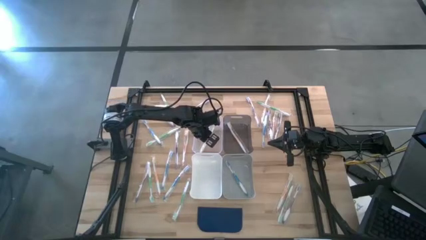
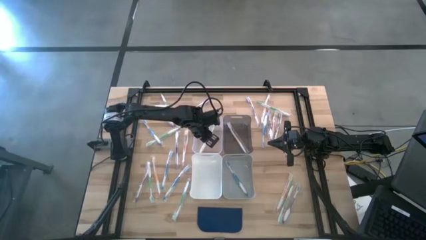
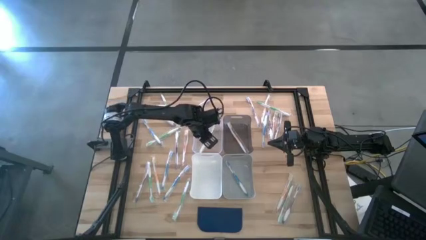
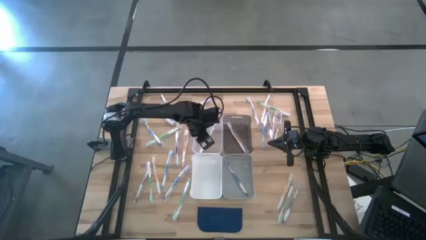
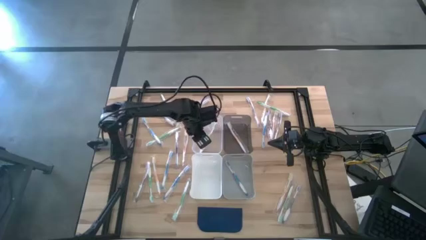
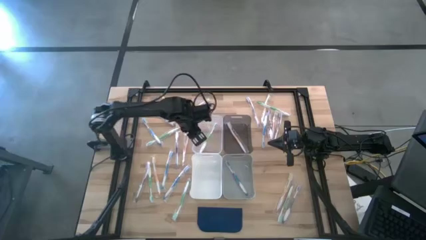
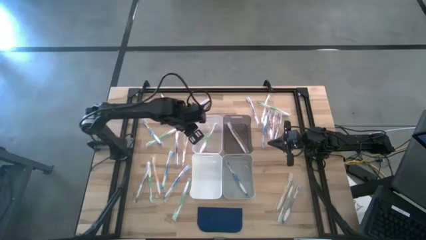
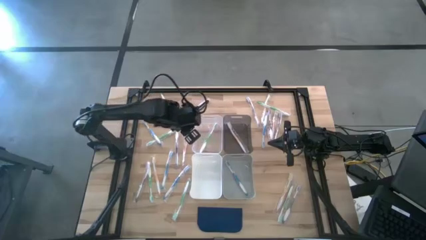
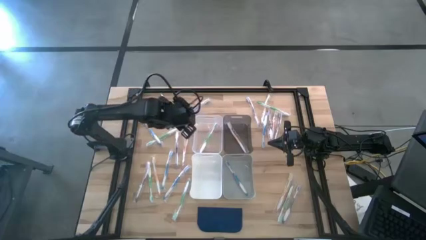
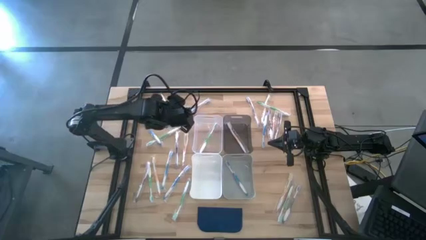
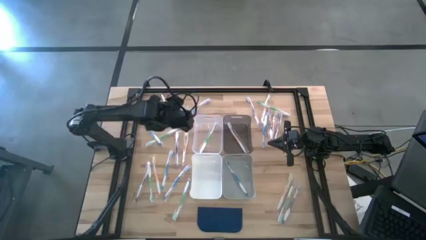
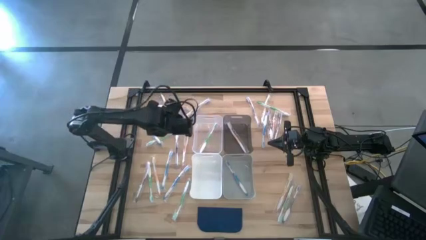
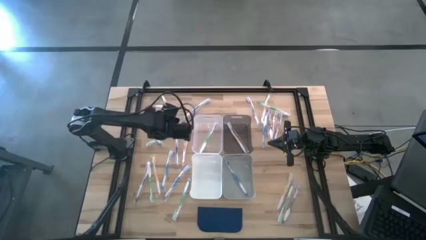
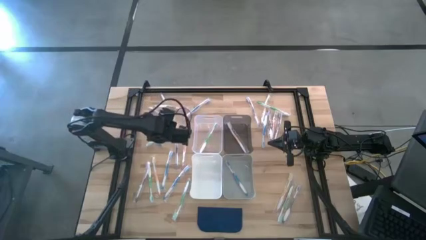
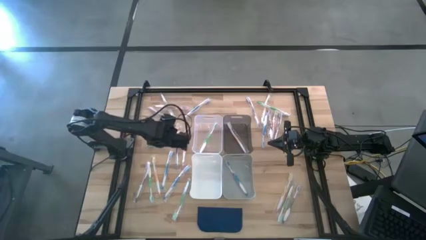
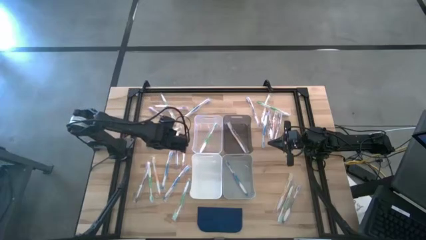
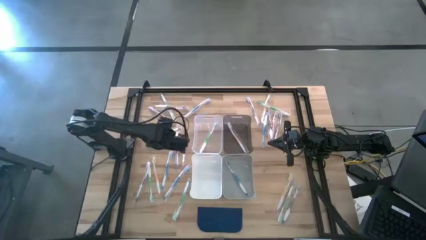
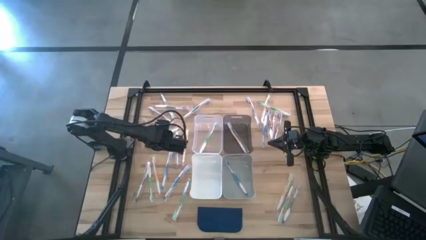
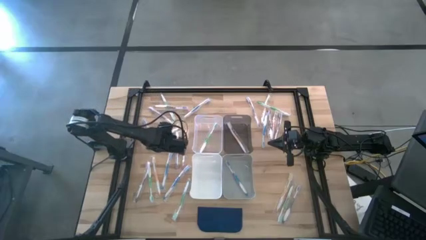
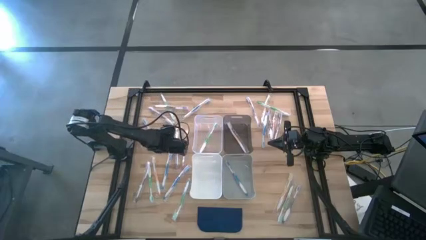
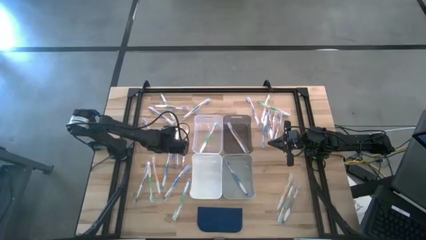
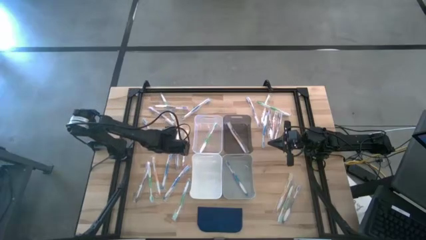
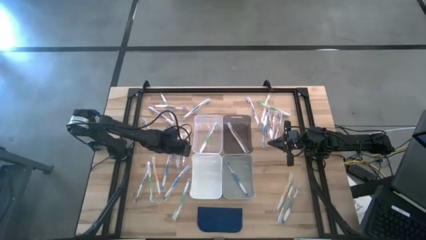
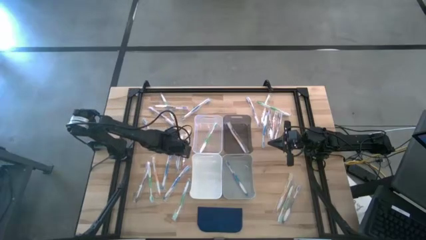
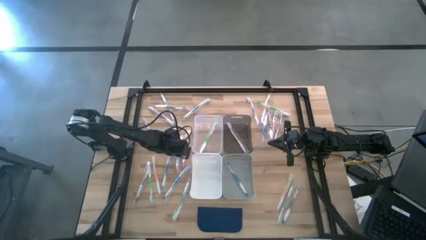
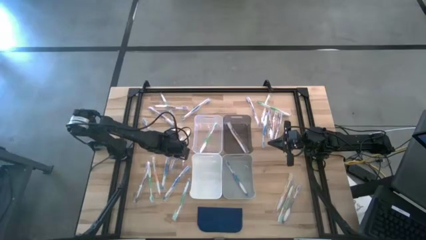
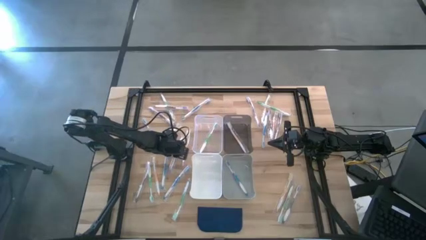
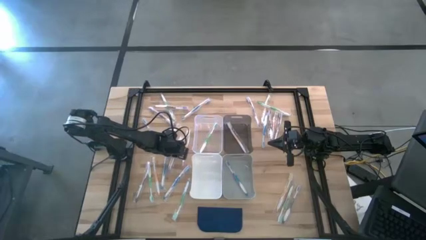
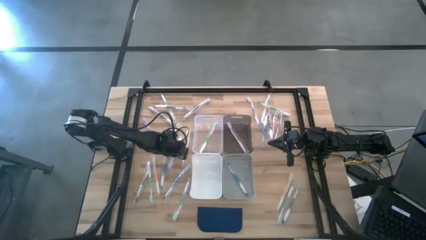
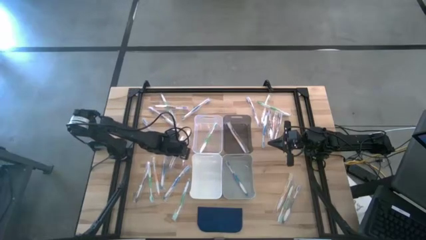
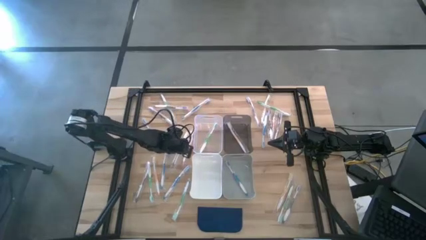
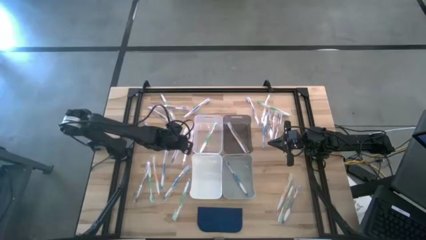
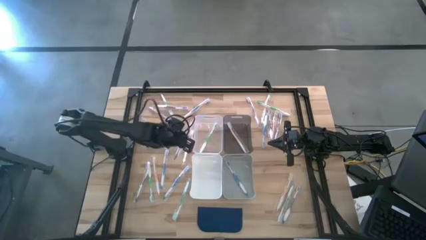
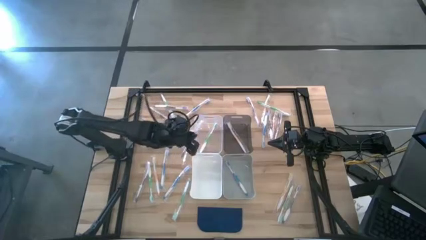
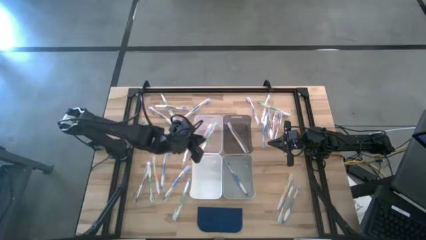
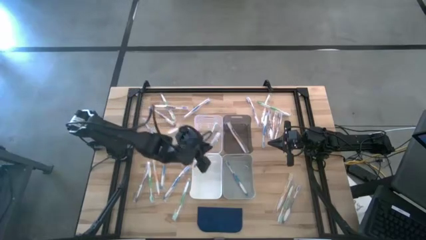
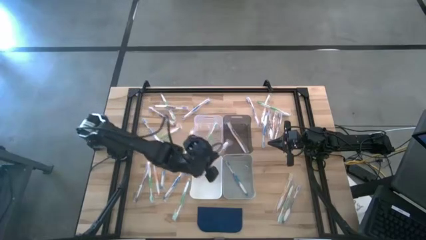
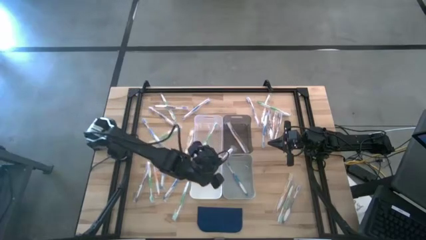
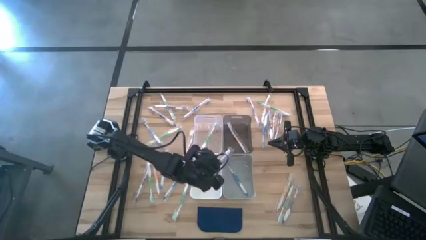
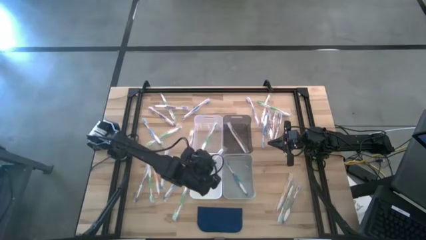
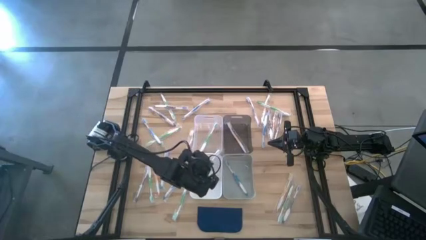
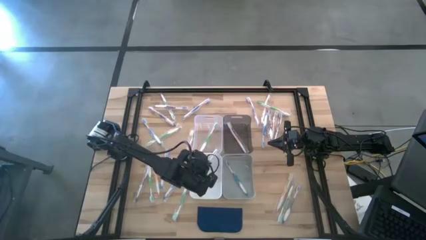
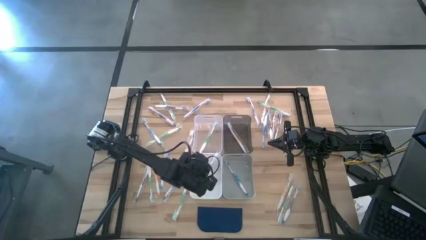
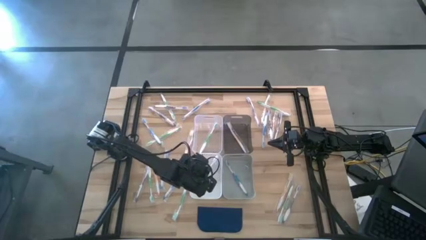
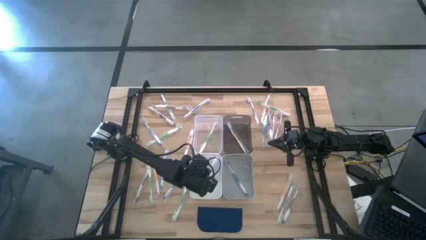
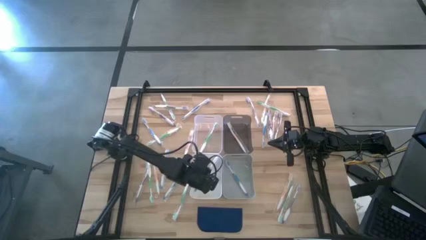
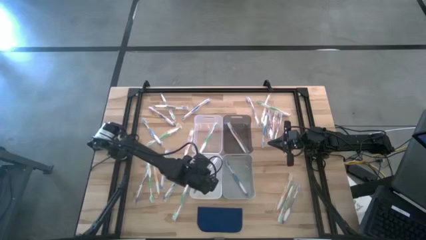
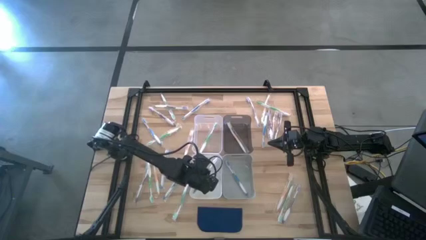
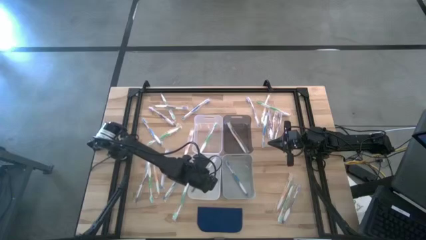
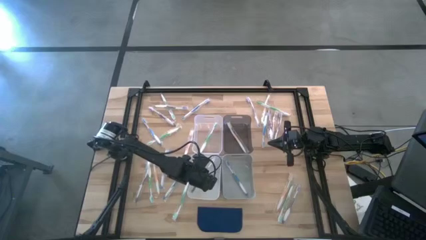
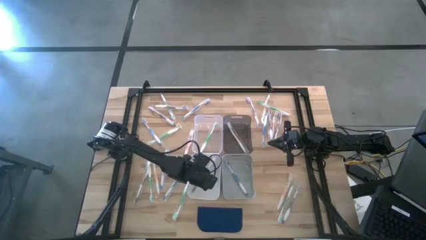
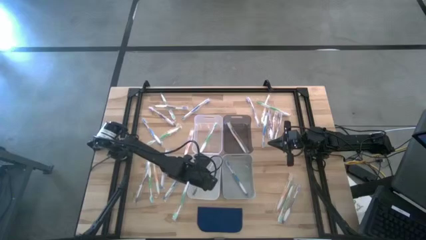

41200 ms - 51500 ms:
Task: Pick & Place Toothbrushes
Put the violet toothbrush into the white bin

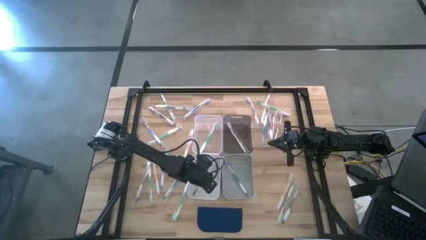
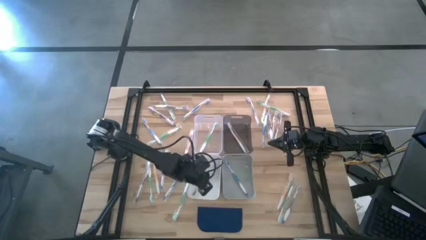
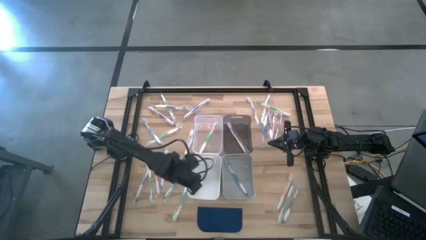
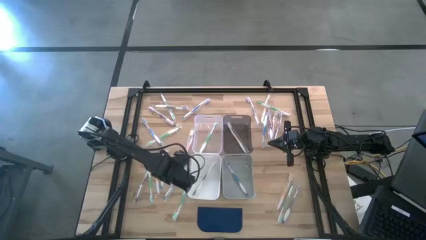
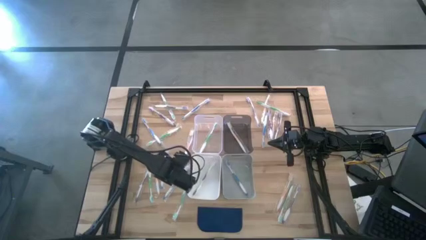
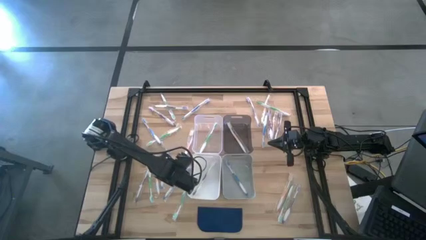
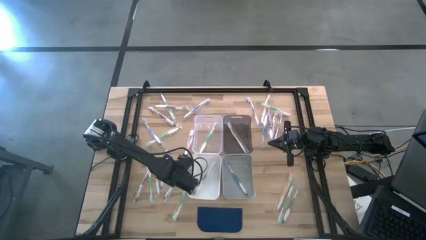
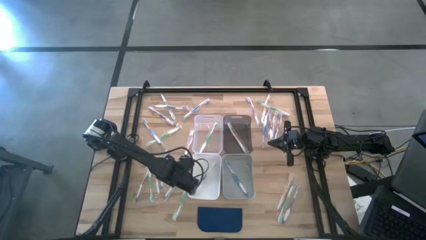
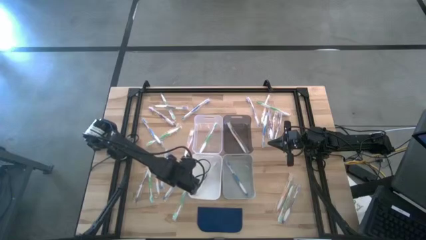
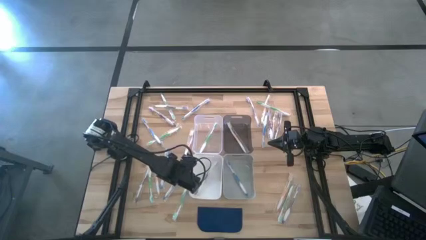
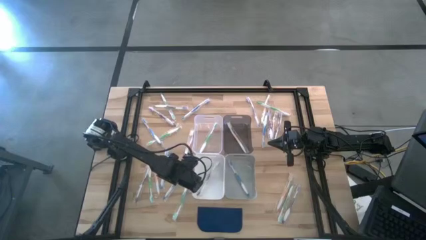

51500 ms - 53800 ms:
Adjust the white bin

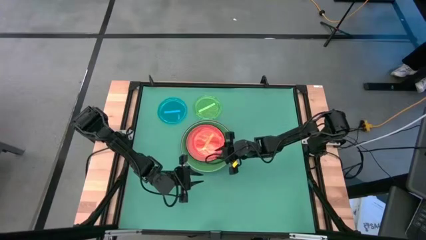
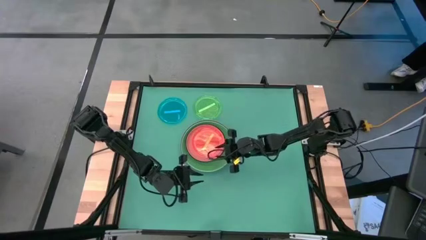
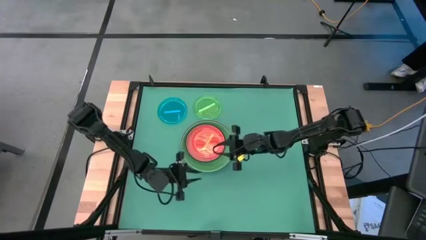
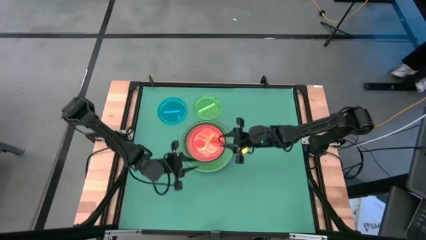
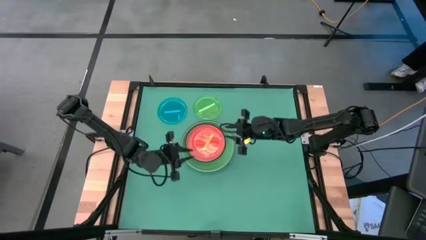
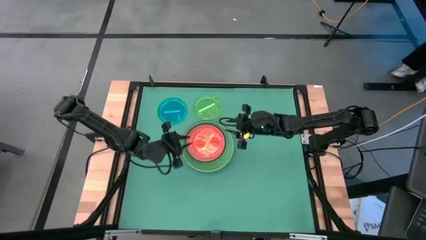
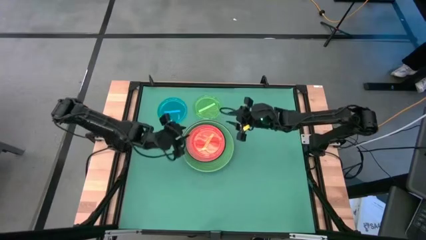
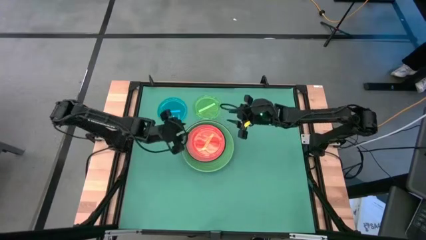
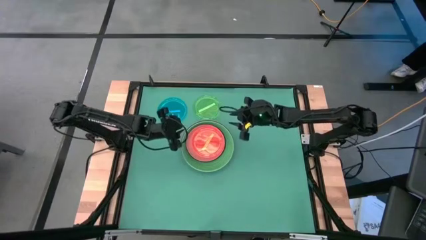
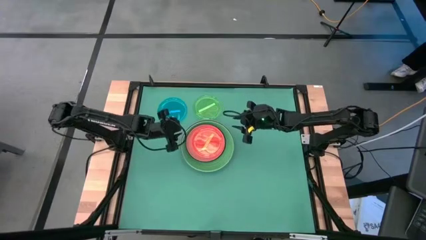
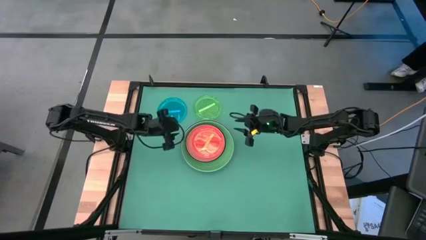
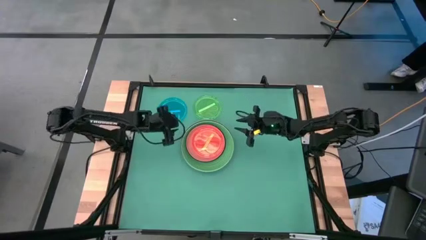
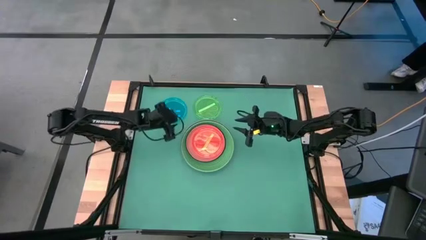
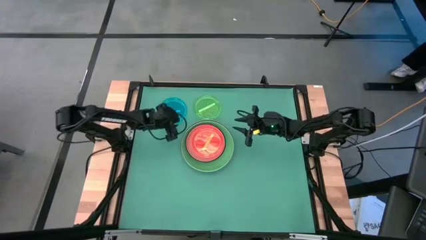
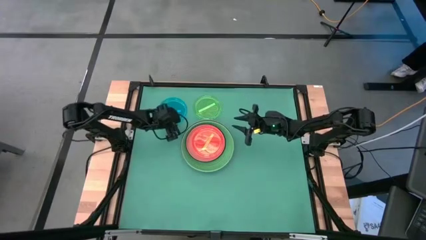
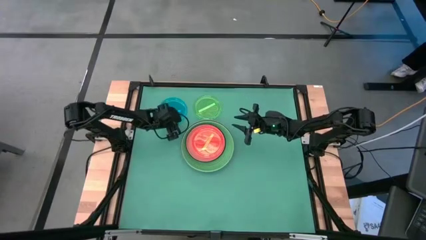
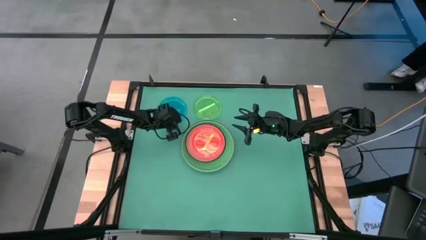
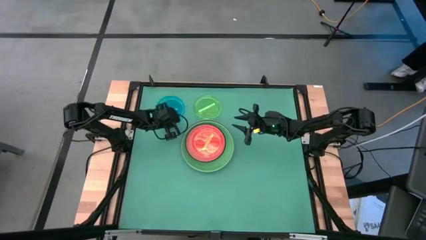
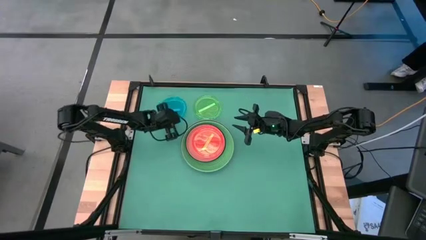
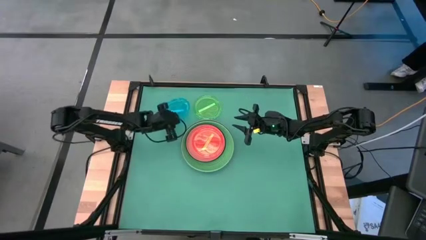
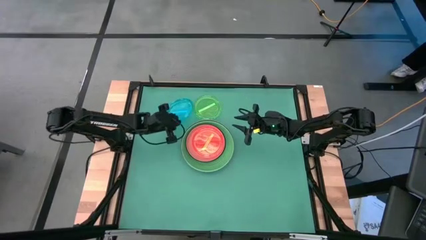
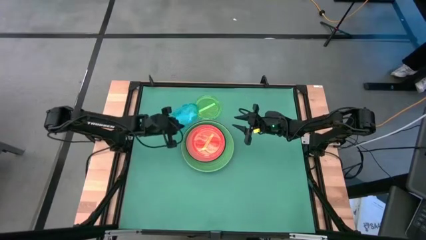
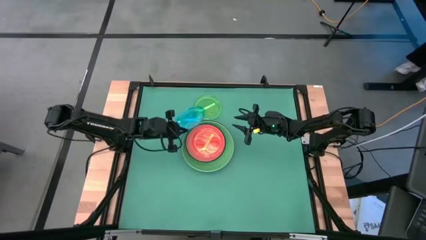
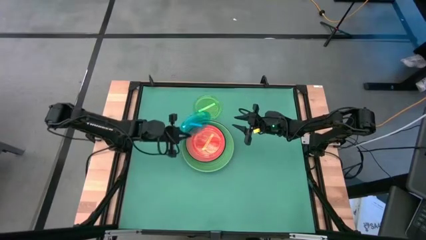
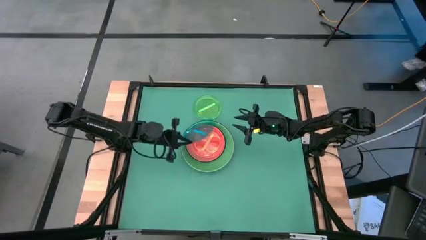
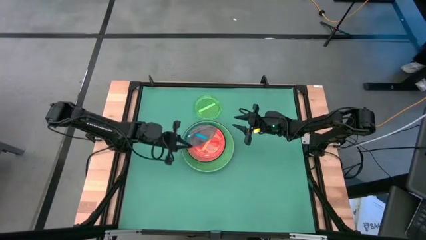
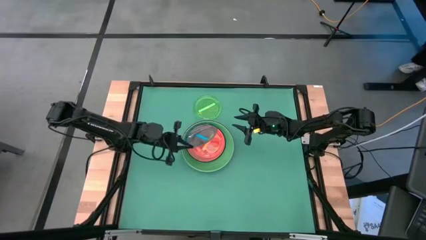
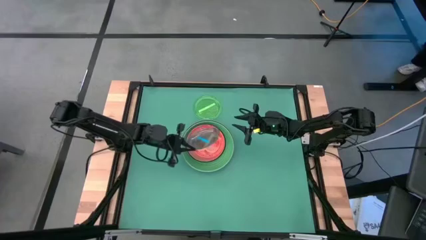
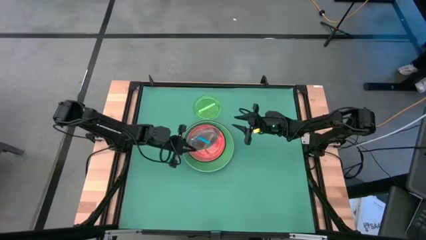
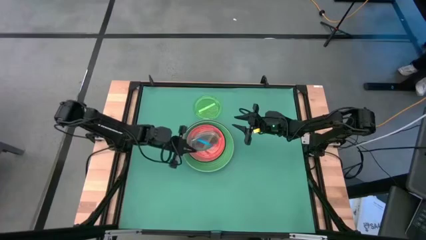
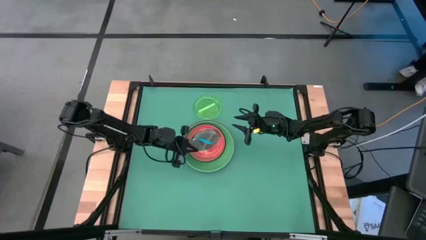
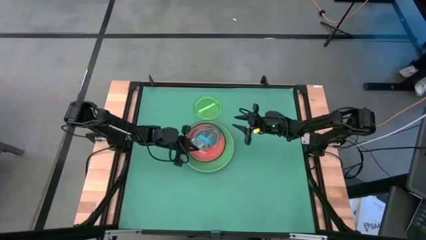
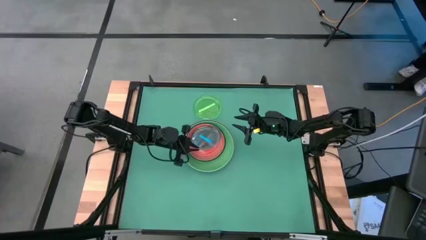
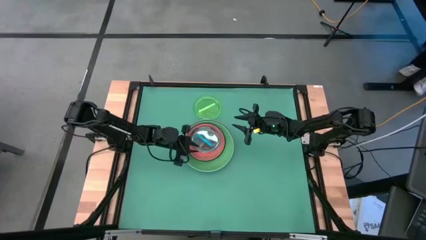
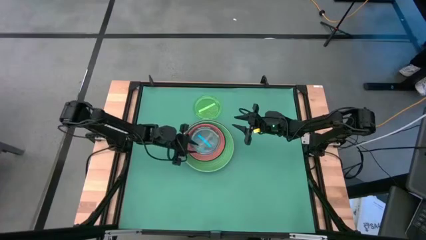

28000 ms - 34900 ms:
Task: Stack plastic plates
Stack the transparent blue plate on top of the transparent orange plate
